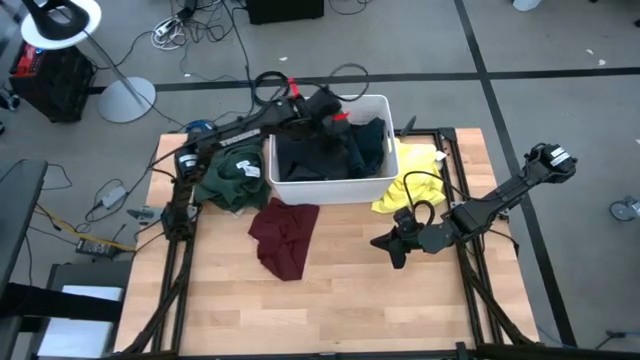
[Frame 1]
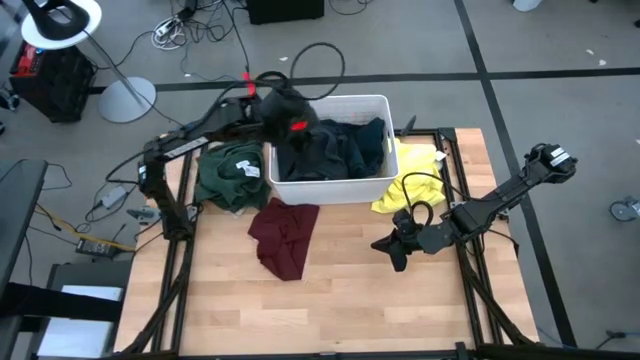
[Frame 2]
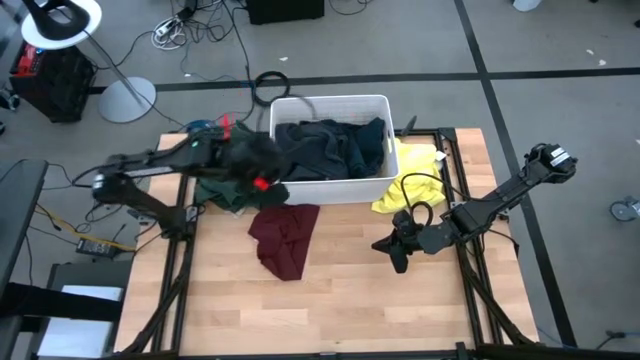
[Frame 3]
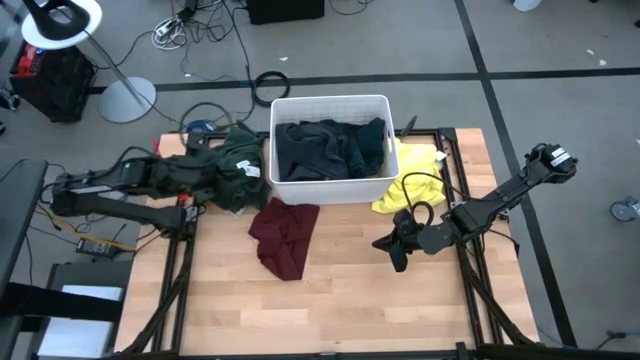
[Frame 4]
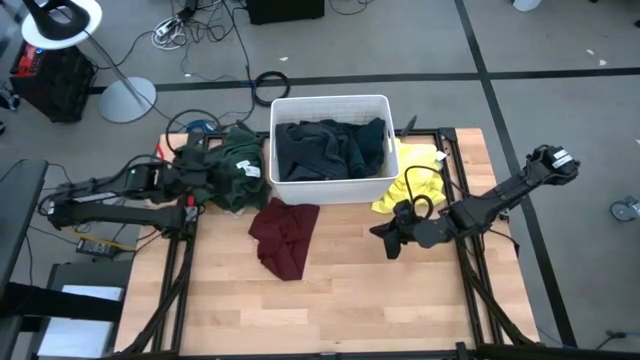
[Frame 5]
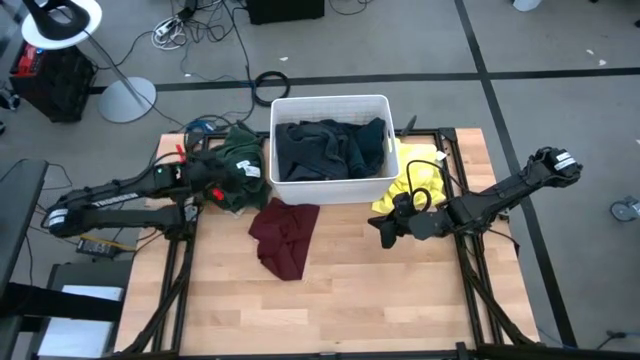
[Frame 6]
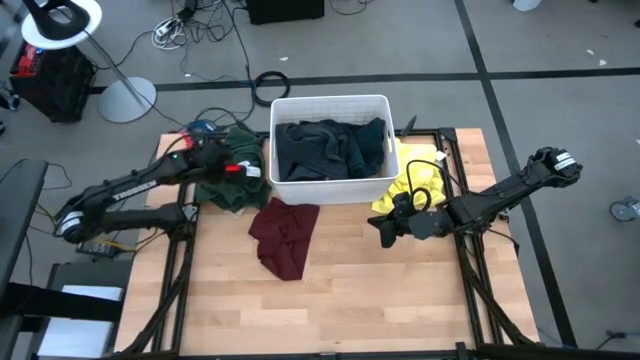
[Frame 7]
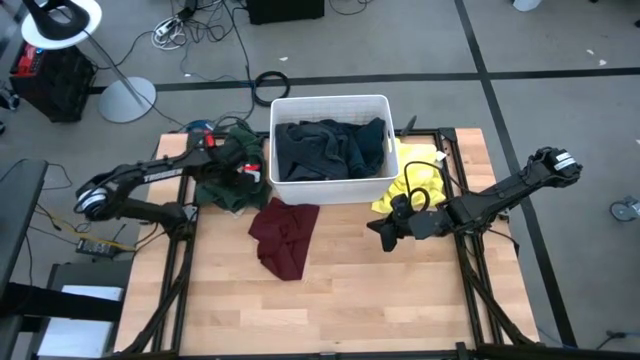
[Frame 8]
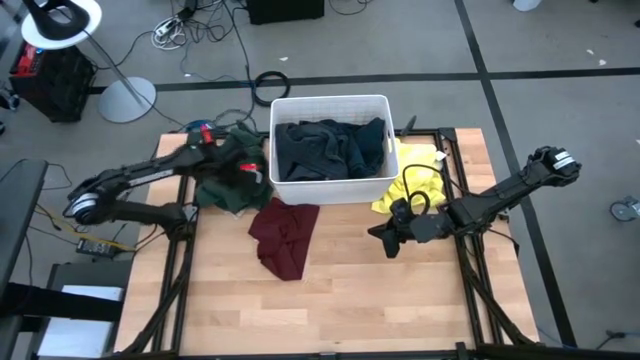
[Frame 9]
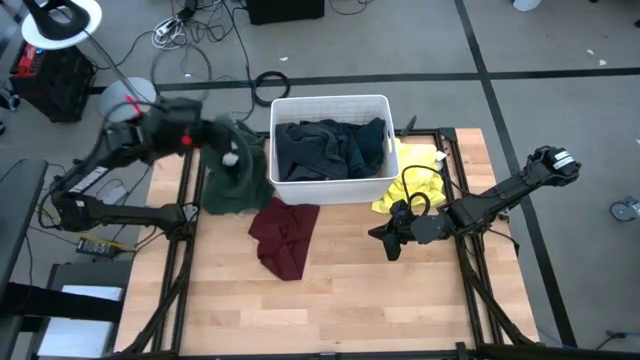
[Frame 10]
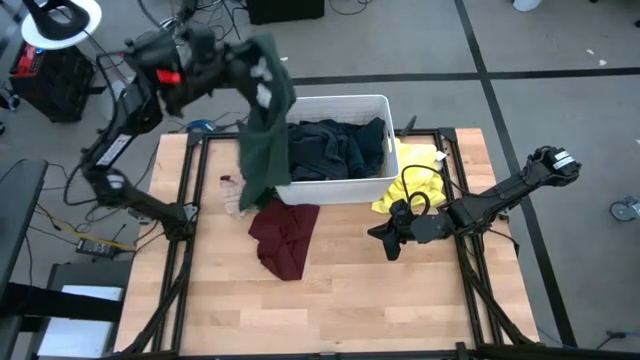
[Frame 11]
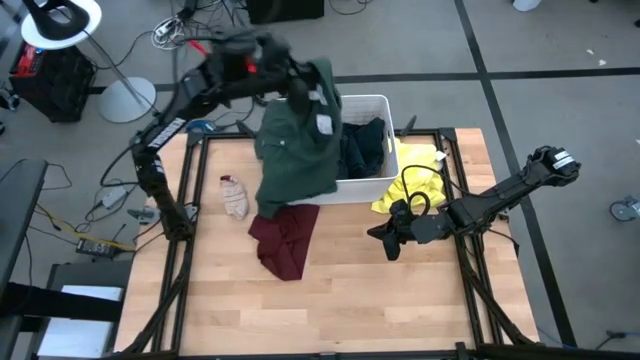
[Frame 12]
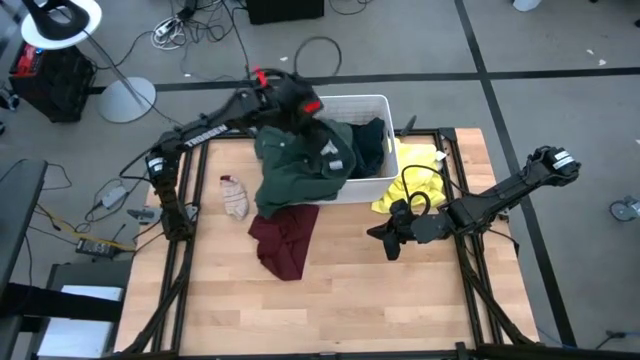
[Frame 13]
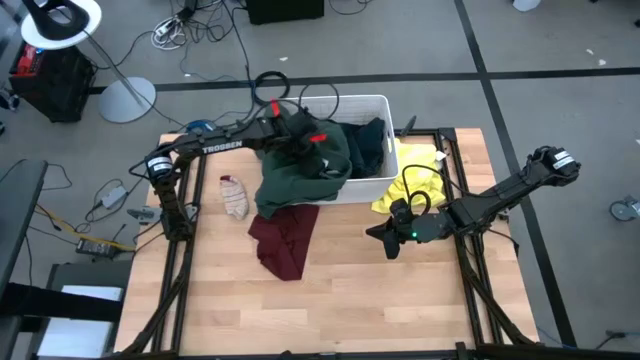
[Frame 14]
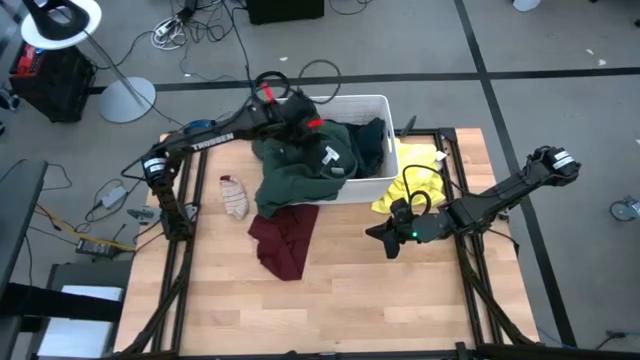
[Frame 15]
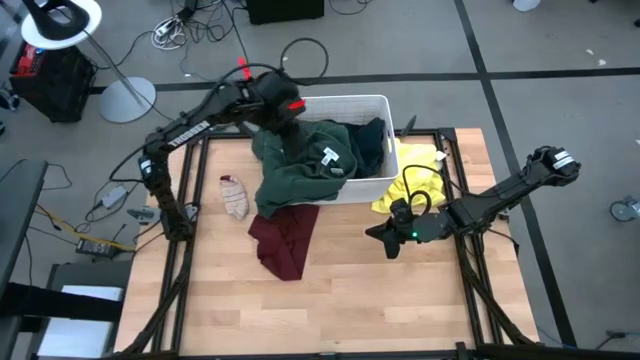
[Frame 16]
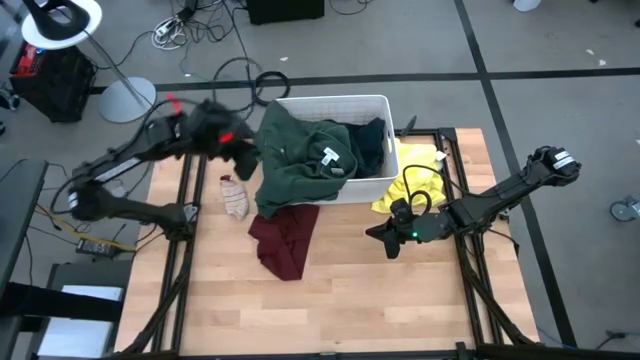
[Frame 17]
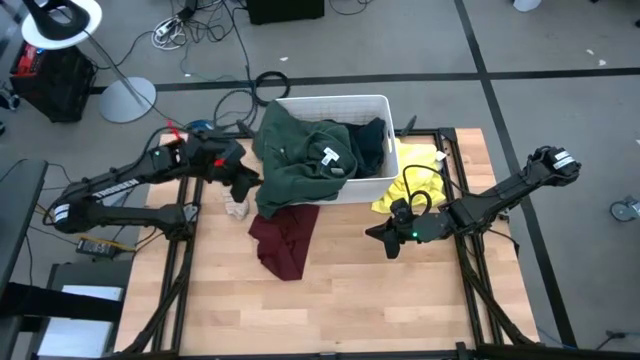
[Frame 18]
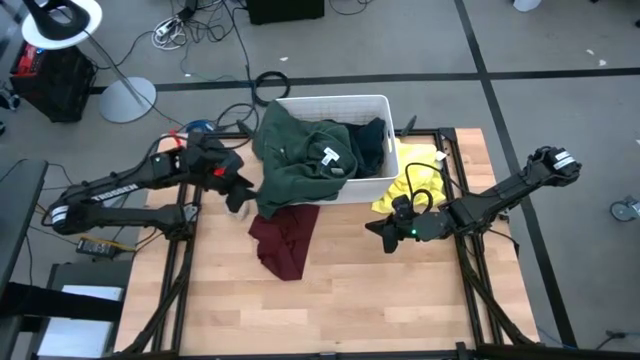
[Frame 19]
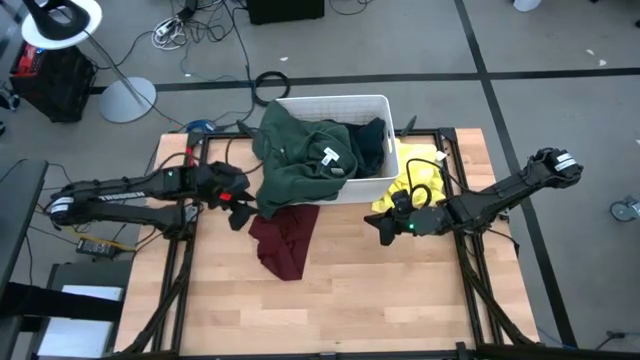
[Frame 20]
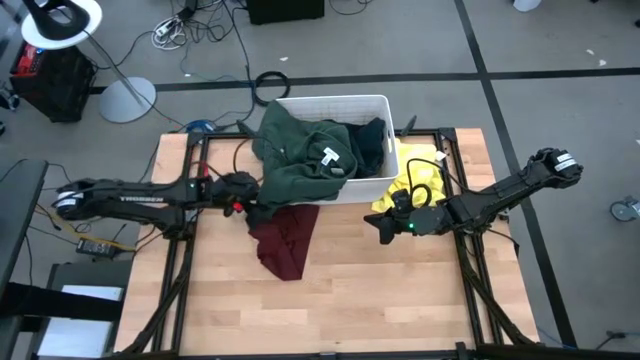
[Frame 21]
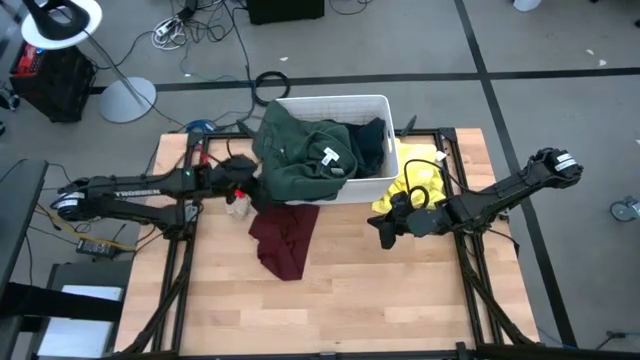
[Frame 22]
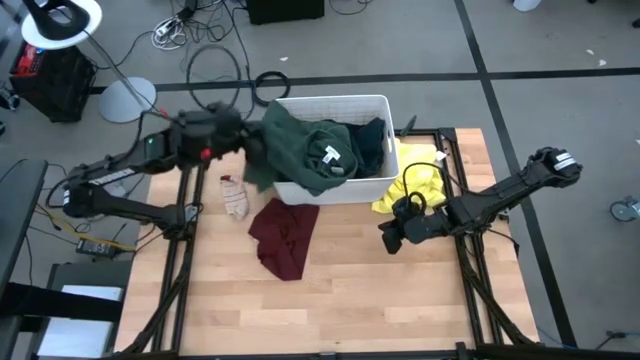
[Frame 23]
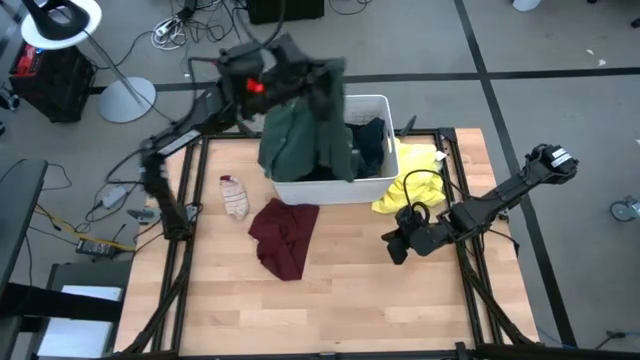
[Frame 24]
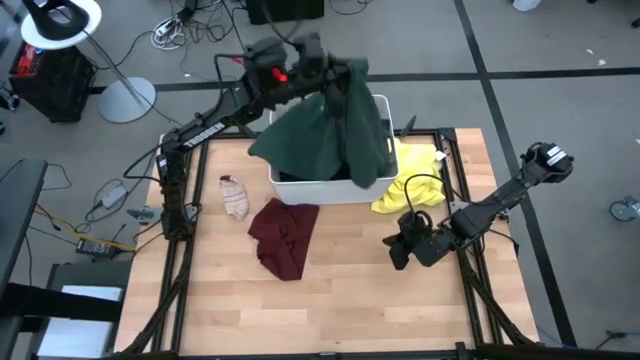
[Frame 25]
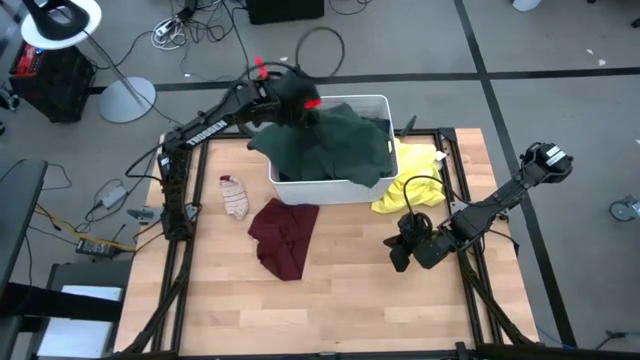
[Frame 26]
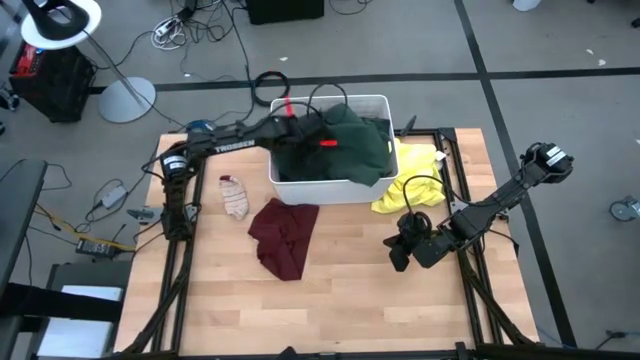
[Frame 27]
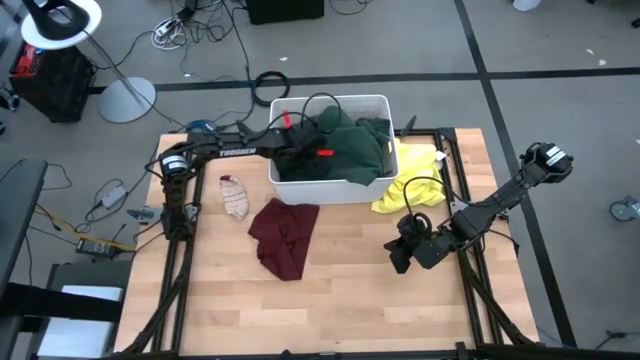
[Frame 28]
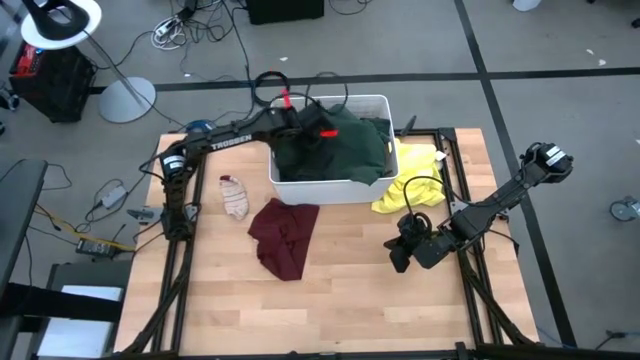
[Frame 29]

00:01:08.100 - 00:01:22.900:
Task: Sort clothes
Put the green polo shirt into the white bin

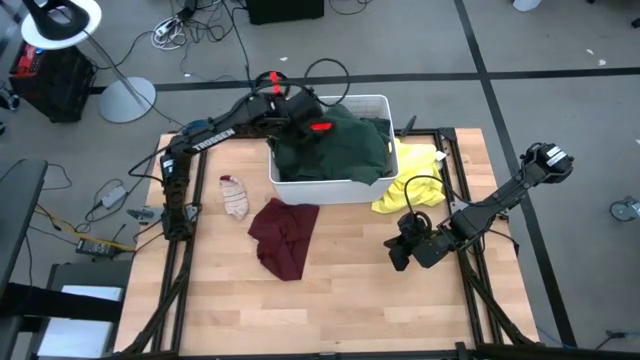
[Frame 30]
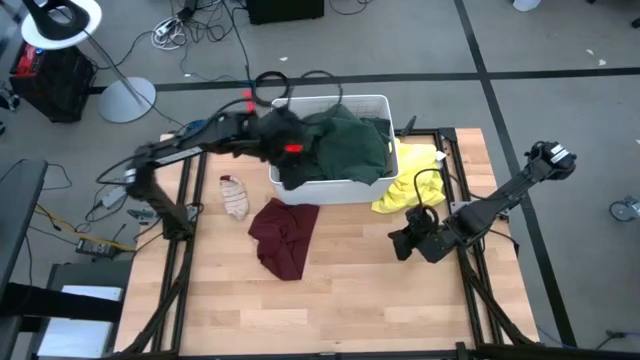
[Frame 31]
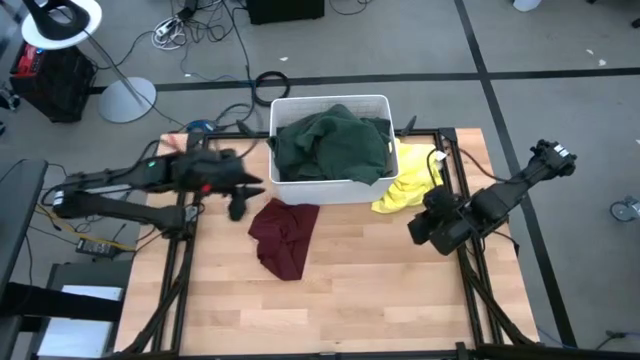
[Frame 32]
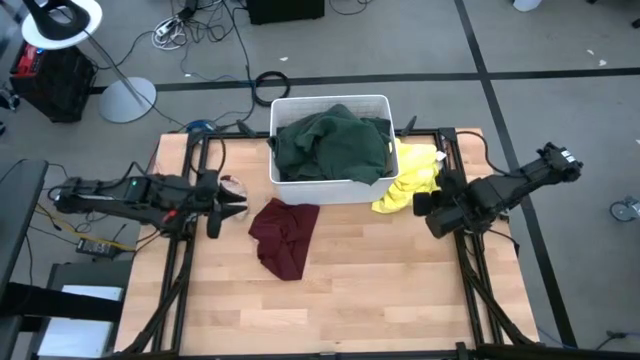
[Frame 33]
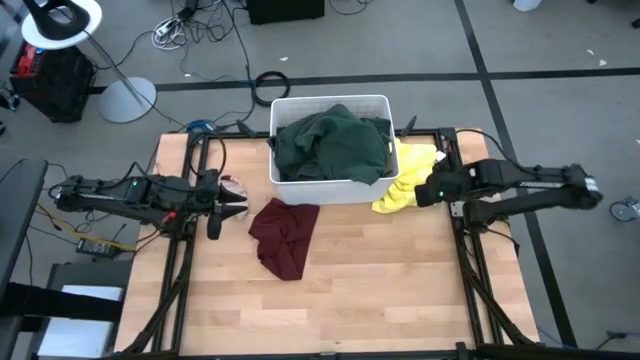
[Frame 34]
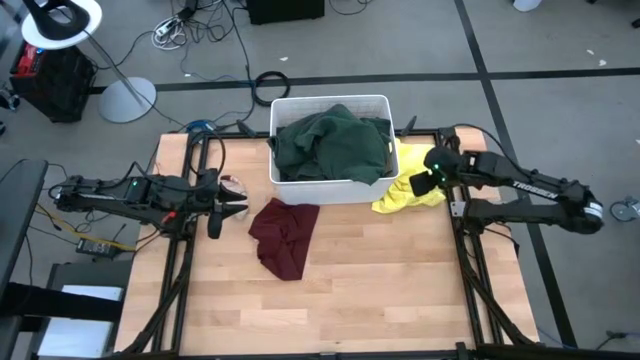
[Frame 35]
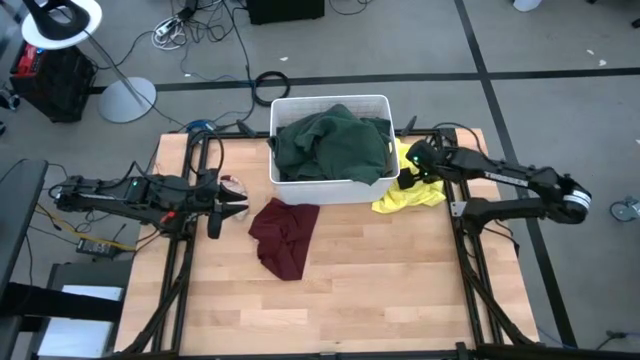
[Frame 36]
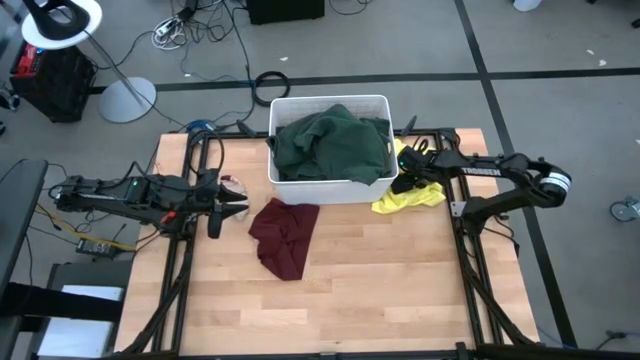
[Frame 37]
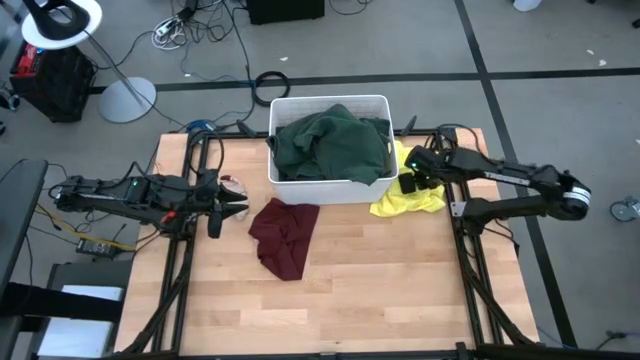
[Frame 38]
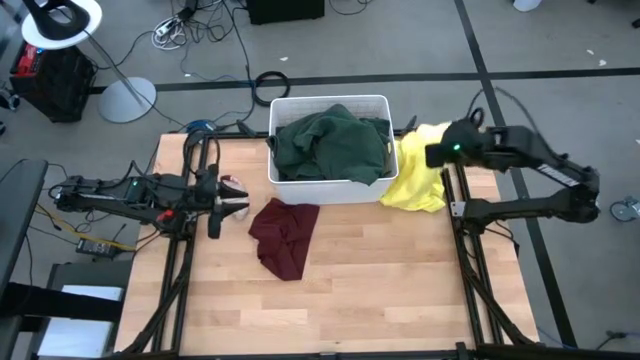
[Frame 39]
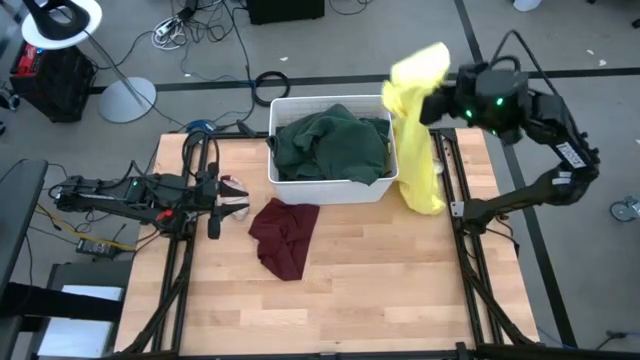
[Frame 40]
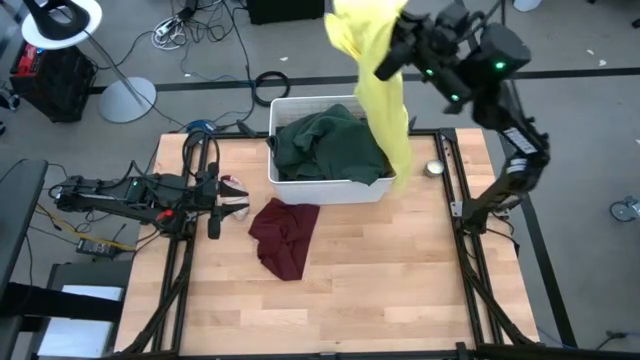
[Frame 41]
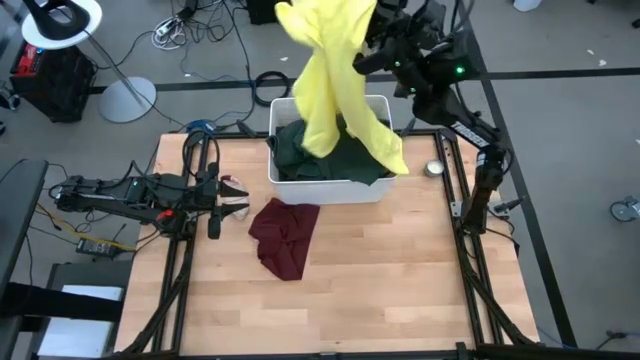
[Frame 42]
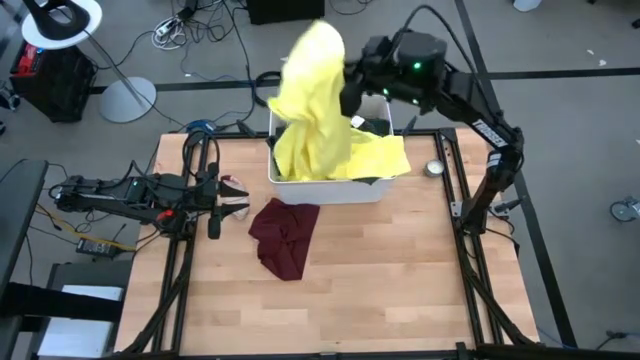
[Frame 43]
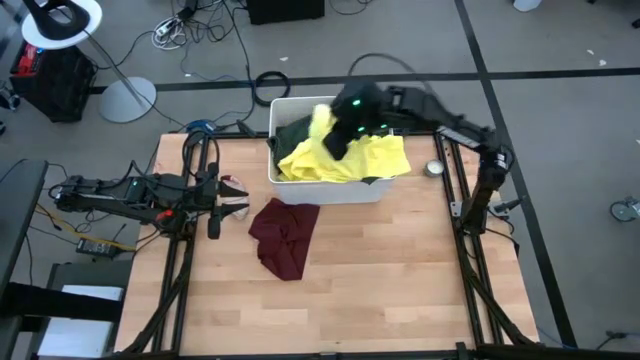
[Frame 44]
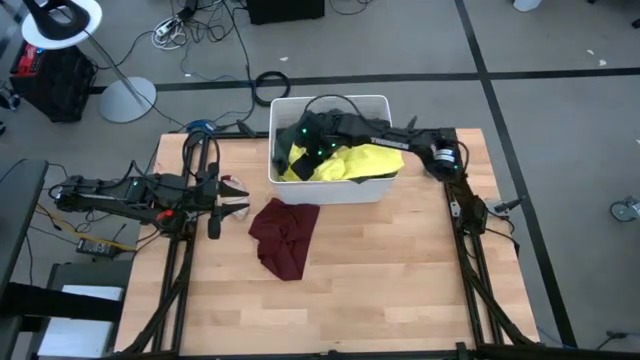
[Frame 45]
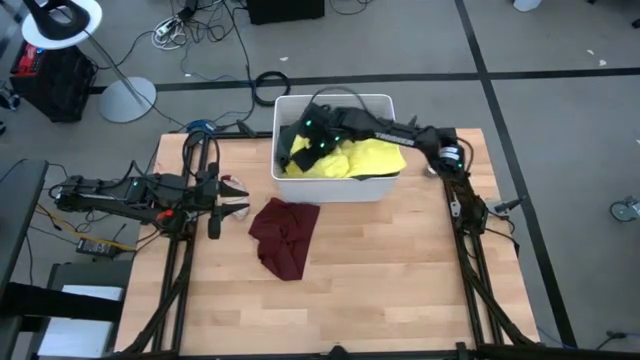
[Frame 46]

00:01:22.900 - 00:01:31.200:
Put the yellow polo shirt into the white bin
